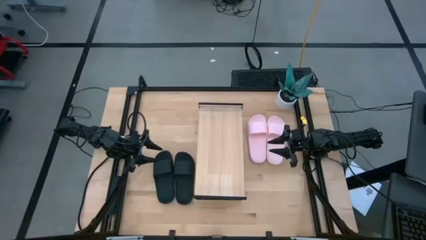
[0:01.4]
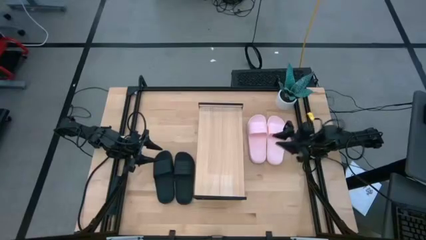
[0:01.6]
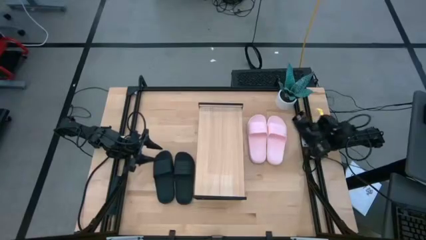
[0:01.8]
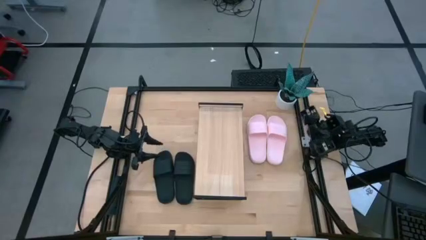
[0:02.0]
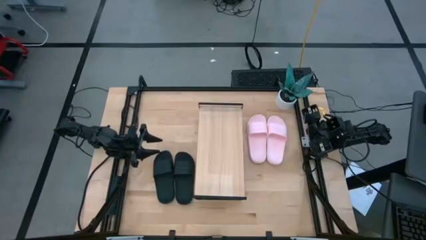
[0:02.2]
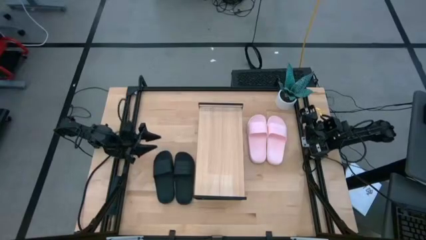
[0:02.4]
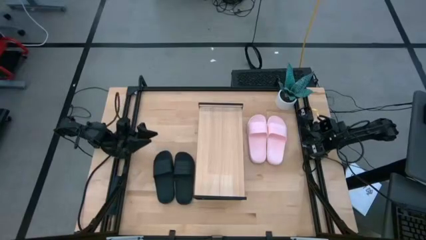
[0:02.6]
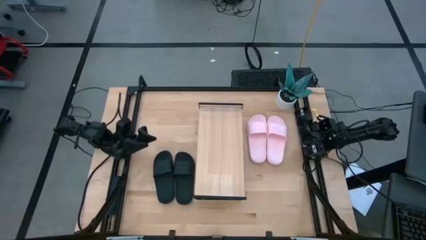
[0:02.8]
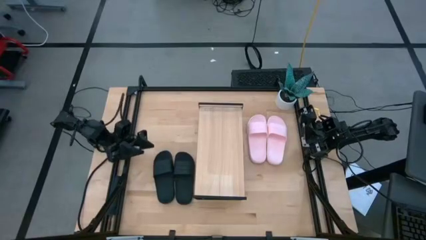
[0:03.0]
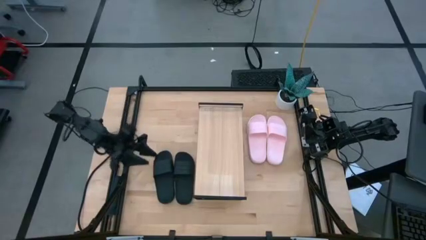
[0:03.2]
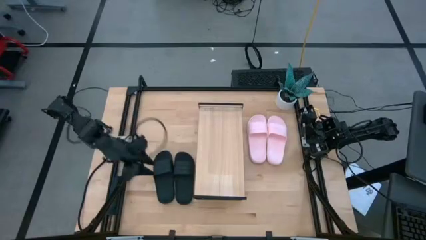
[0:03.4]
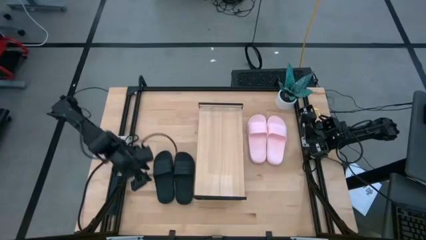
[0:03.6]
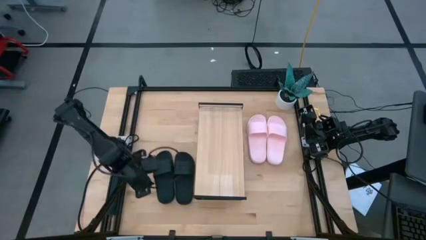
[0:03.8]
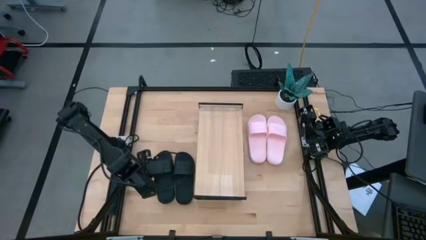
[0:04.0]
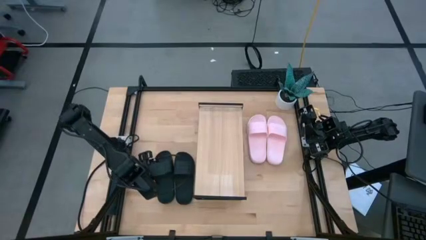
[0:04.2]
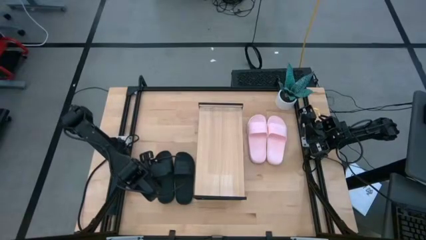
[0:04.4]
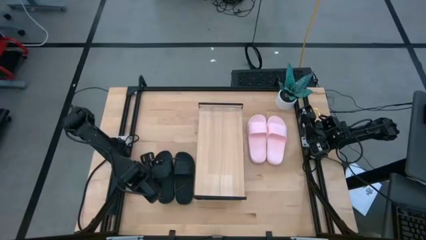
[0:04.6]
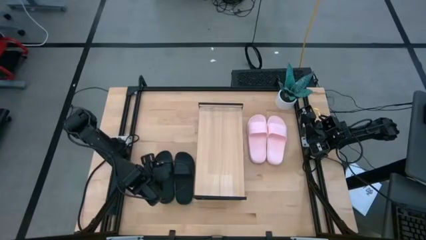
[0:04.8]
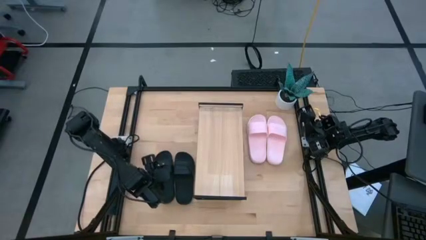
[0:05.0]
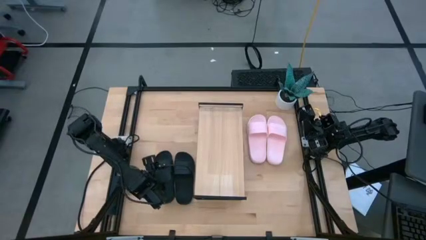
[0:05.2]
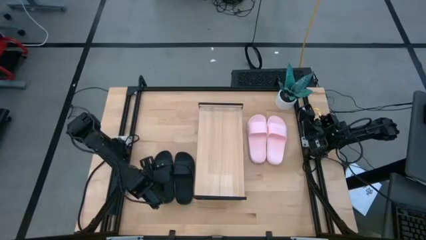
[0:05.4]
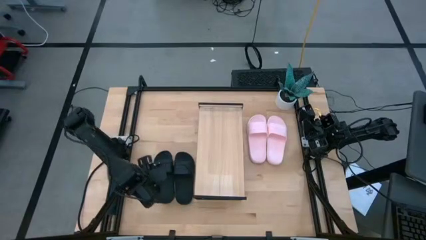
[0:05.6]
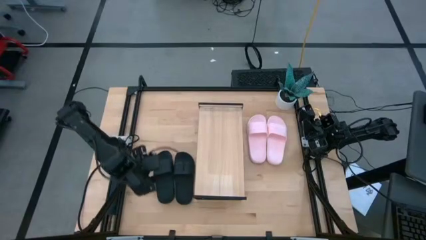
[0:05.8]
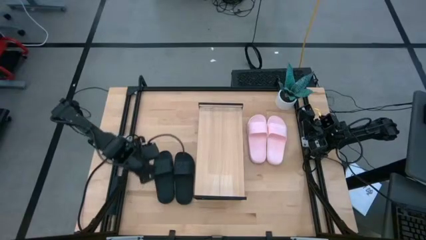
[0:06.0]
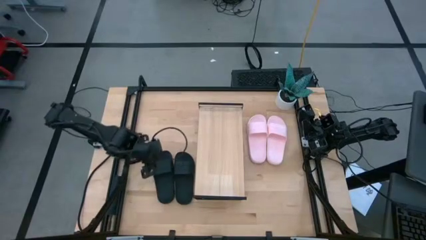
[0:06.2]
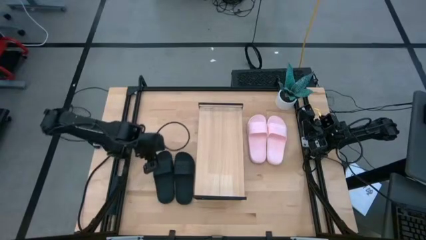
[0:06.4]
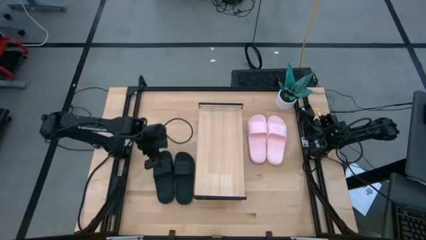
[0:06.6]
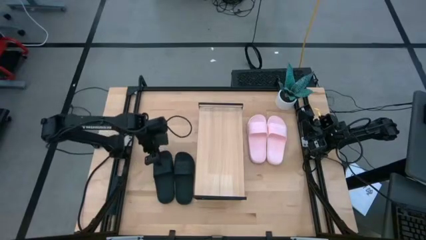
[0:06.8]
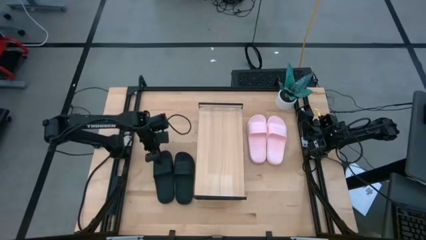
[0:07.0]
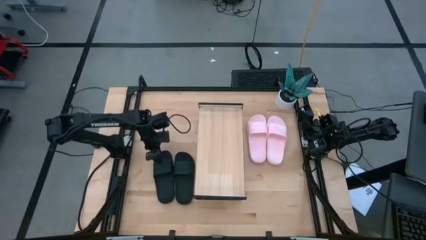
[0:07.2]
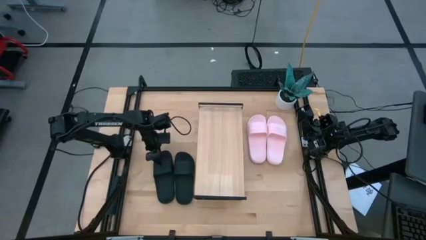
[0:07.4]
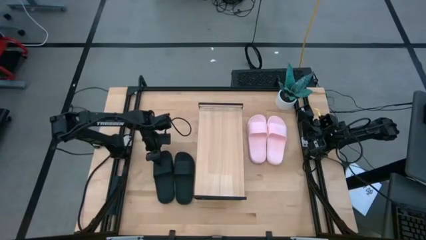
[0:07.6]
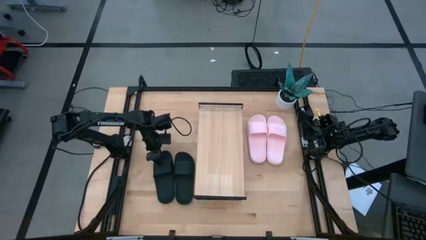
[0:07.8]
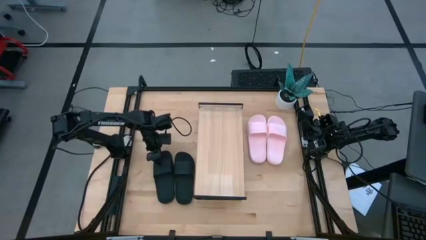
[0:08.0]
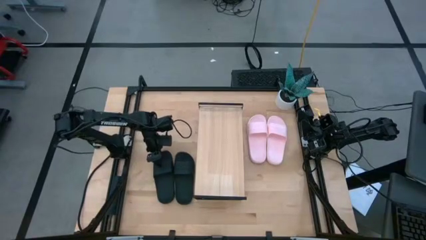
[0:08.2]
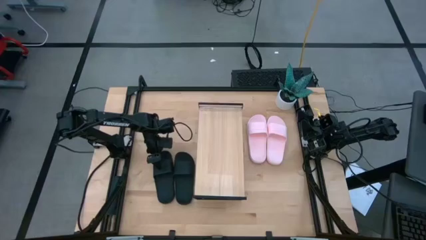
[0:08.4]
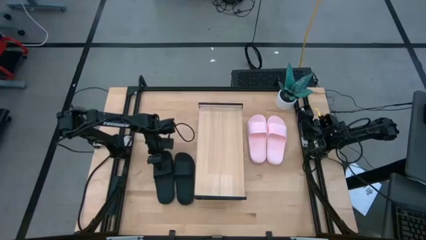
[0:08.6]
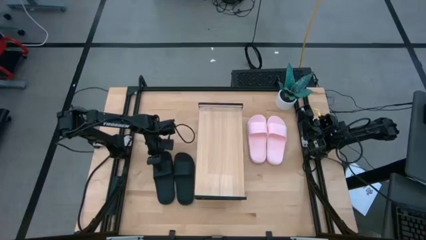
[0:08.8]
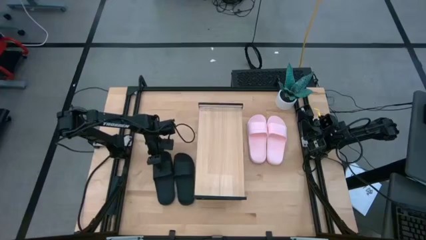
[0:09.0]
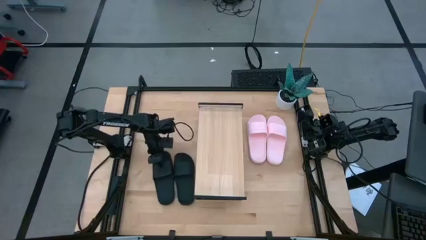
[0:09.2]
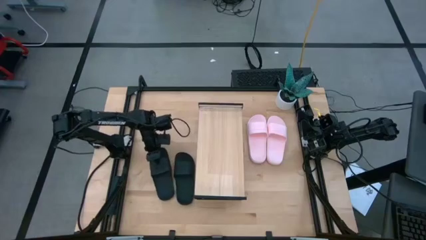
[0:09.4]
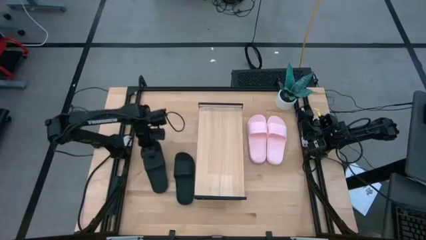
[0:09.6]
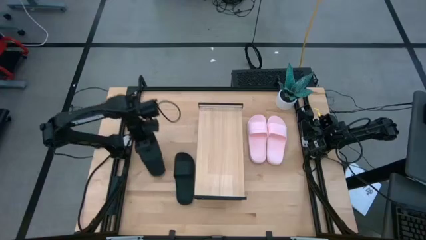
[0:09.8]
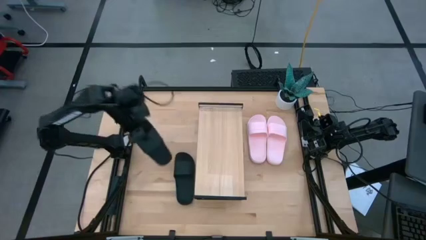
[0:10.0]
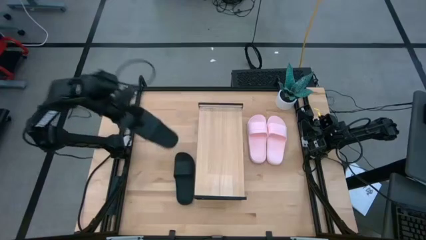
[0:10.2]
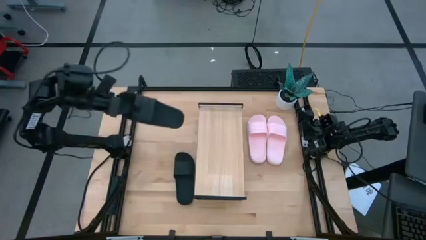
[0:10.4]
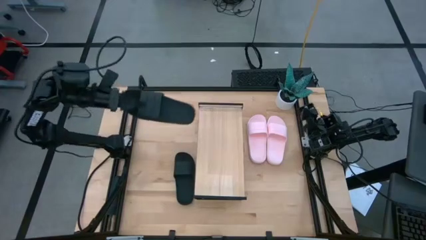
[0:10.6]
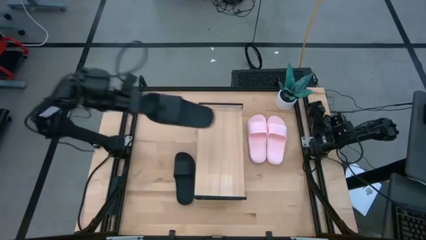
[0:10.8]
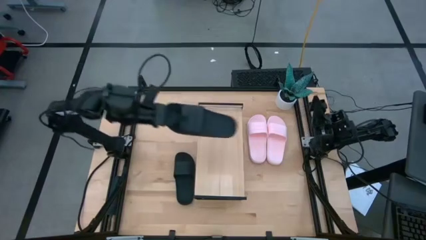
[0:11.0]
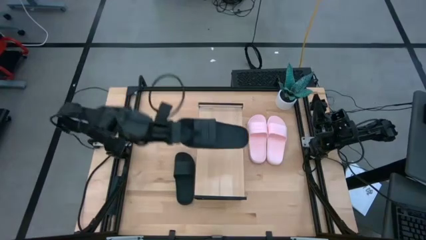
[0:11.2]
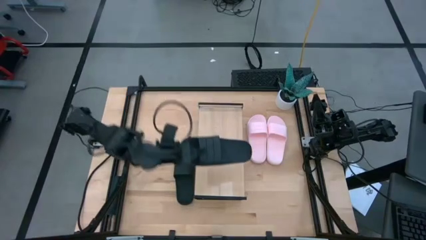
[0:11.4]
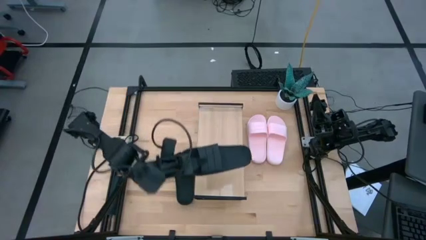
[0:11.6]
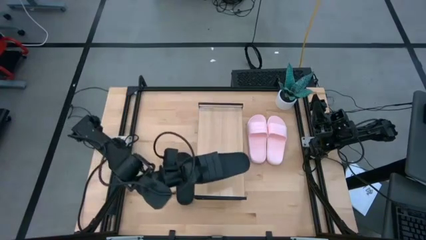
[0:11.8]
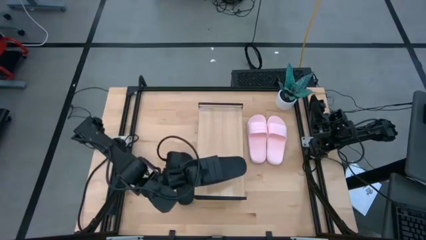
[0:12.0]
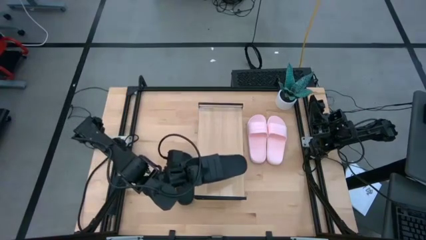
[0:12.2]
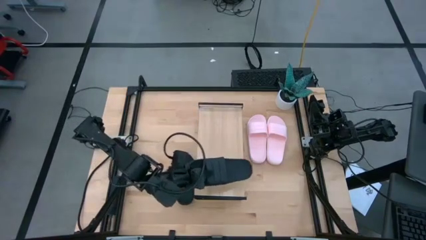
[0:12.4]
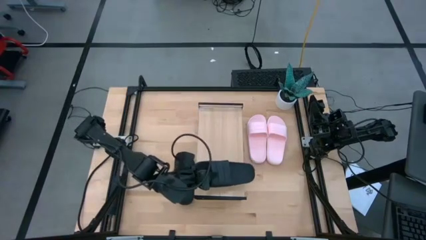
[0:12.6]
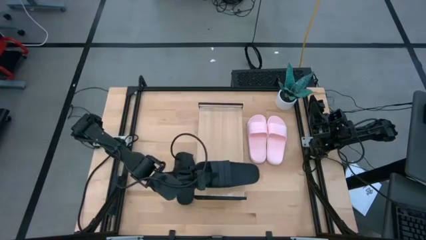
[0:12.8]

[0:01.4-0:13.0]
Task: Pick and place slides into the shelf
Put the left black slides on the shelf

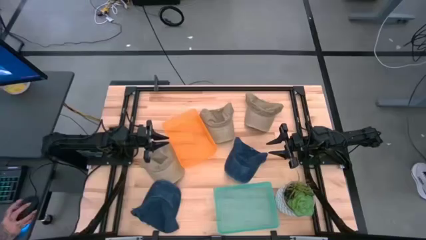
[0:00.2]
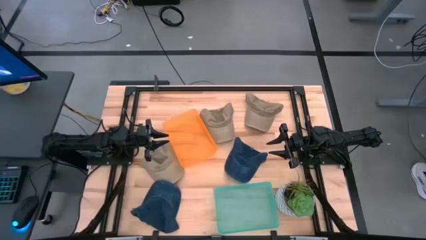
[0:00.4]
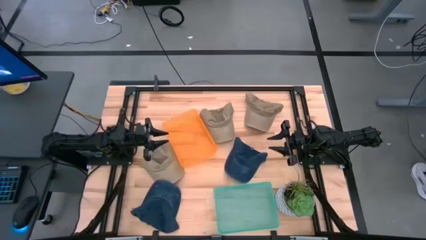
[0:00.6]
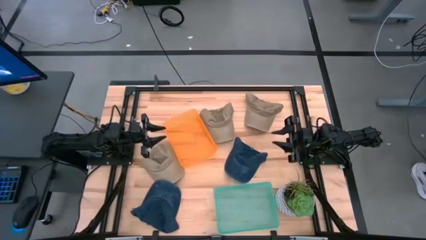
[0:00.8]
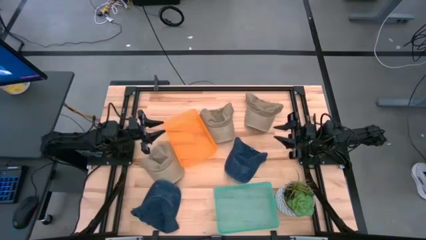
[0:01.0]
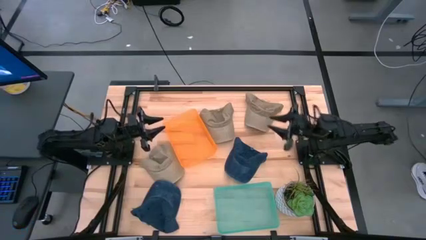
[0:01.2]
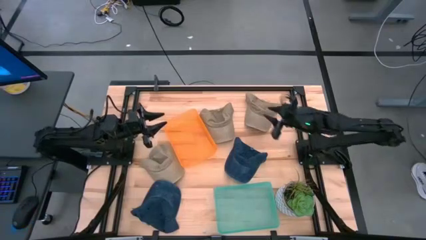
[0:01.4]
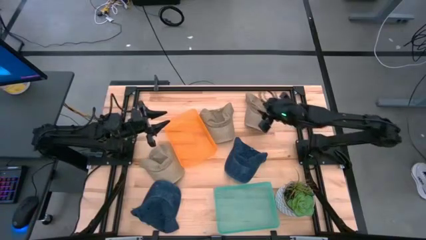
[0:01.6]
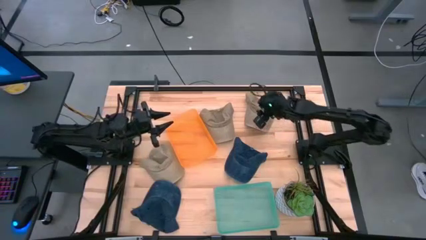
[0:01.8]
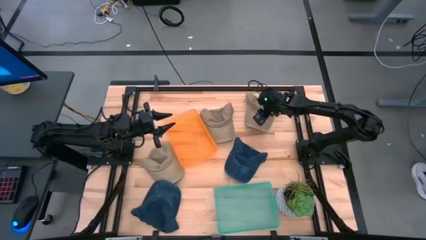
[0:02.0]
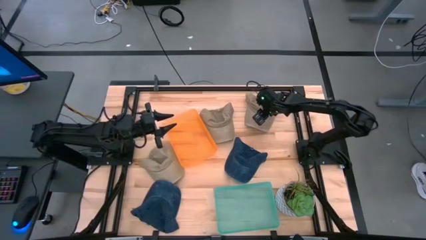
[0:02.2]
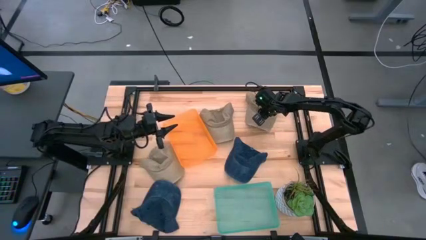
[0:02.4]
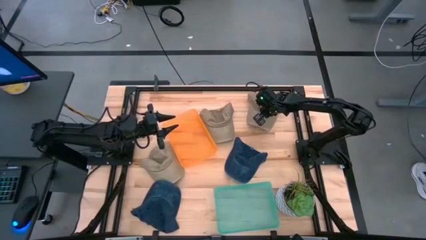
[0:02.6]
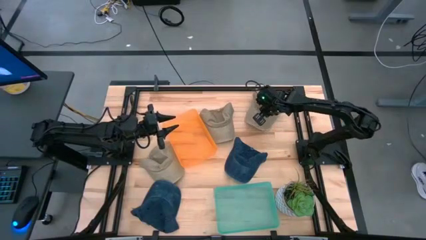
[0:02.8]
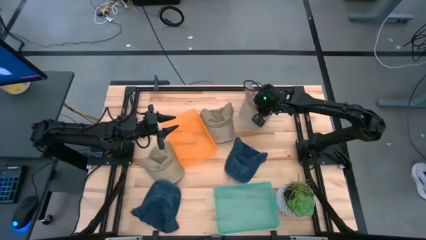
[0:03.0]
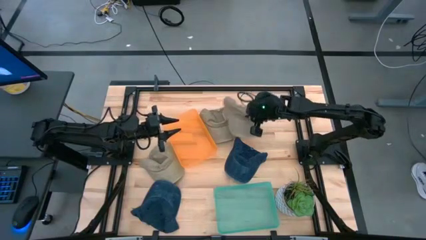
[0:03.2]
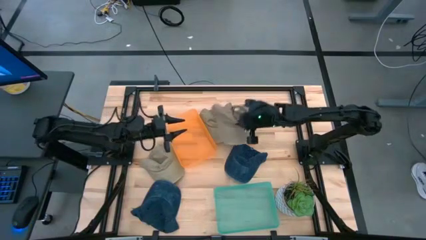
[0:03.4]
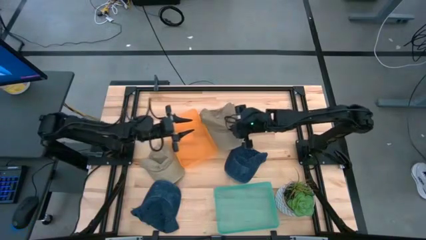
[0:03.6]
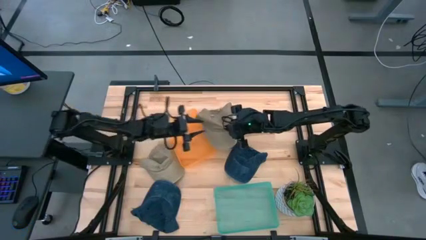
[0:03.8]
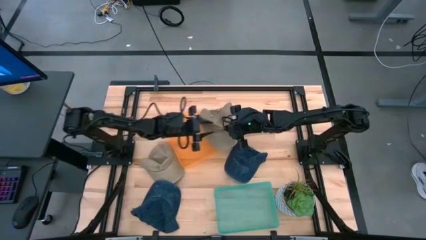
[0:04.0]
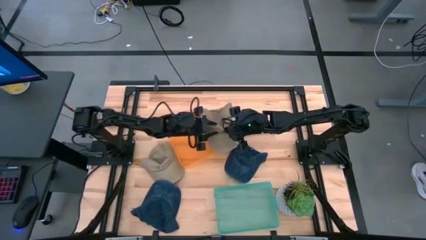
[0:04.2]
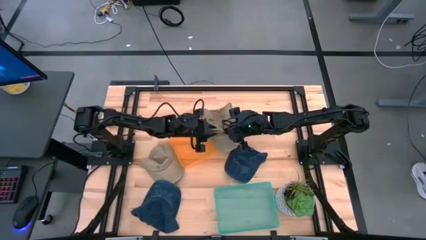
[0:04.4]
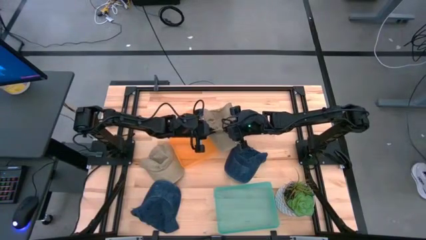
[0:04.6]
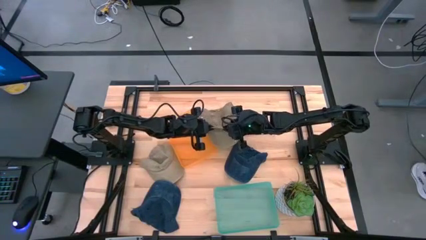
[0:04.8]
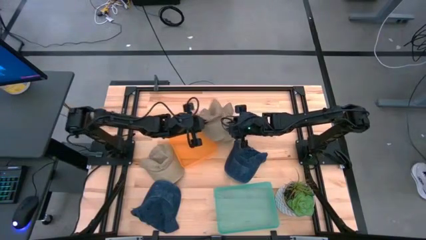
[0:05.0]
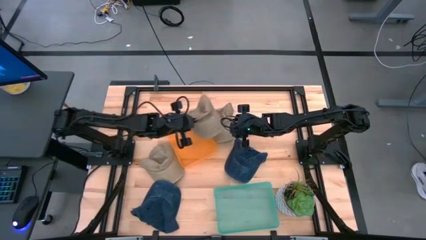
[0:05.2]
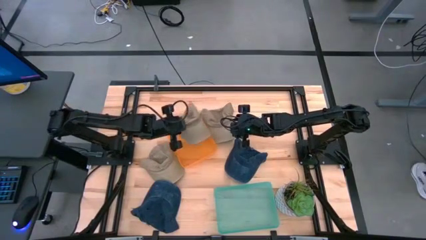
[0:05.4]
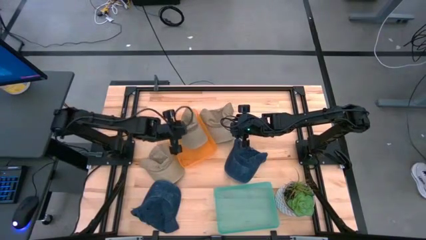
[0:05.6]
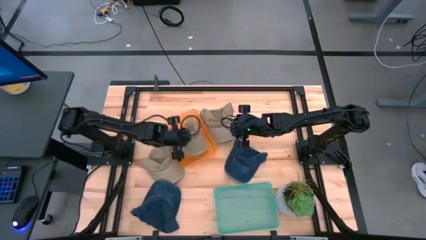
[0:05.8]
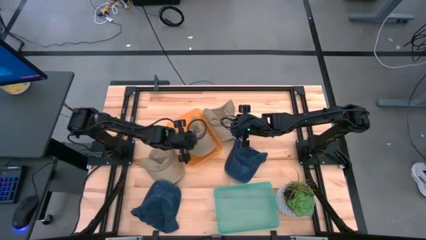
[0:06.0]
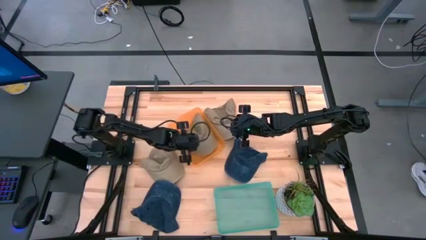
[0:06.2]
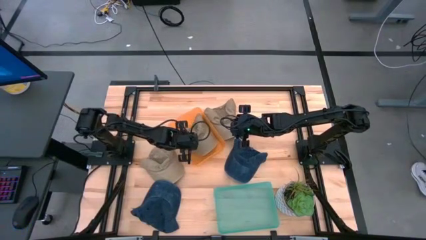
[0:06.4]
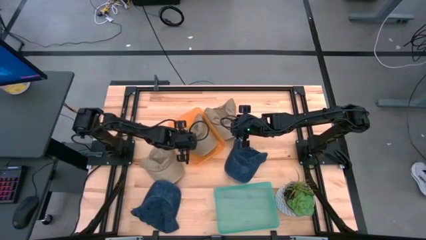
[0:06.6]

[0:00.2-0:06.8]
Task: Pick & Place hat
Put the top right brown cap into the orange bin
